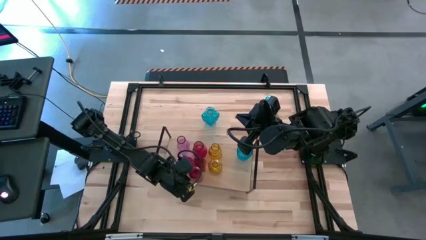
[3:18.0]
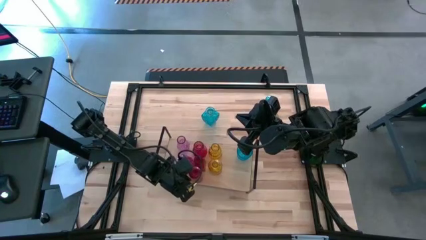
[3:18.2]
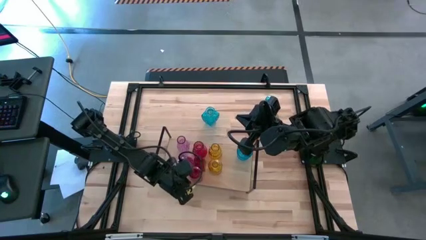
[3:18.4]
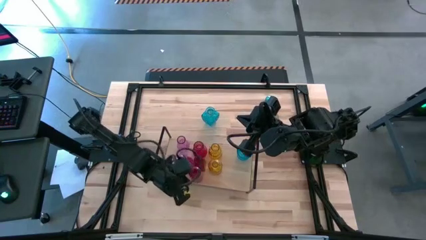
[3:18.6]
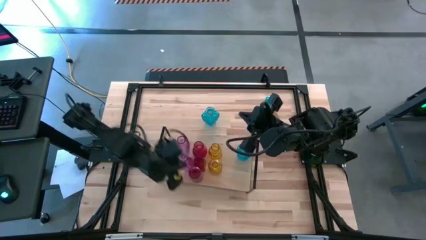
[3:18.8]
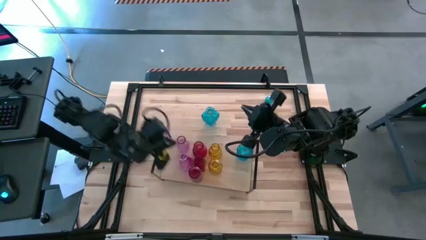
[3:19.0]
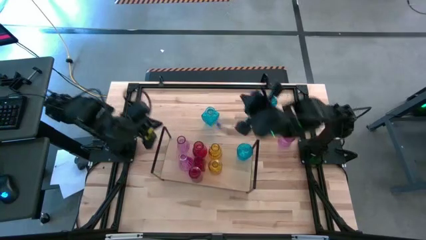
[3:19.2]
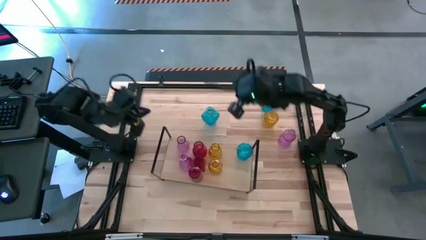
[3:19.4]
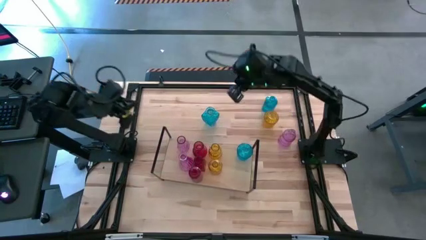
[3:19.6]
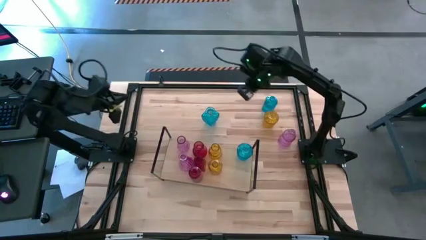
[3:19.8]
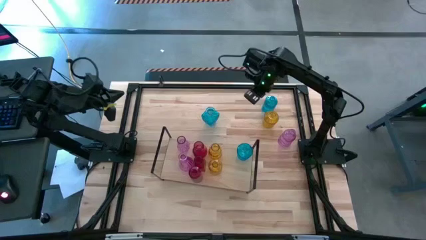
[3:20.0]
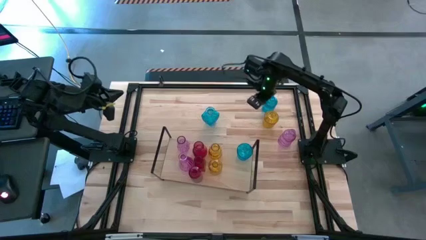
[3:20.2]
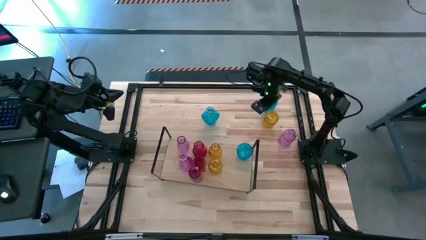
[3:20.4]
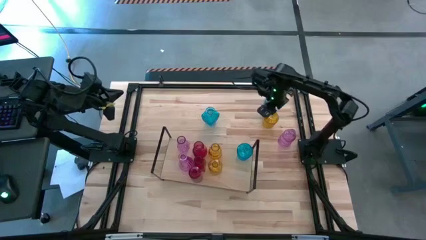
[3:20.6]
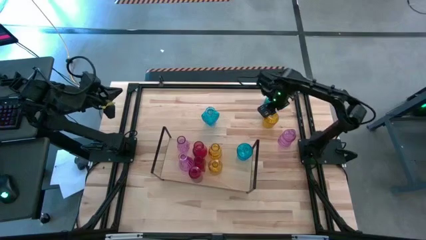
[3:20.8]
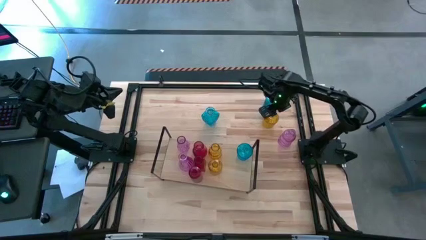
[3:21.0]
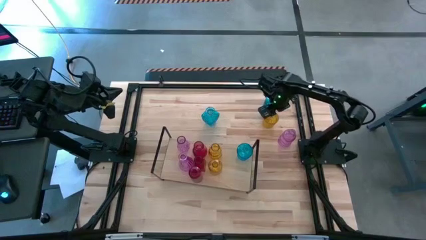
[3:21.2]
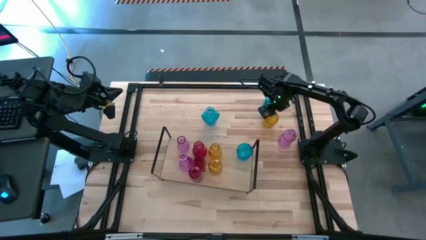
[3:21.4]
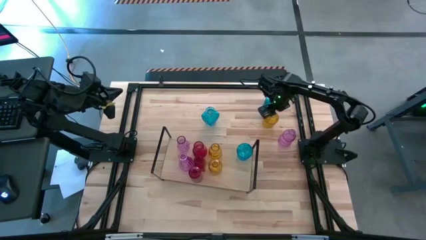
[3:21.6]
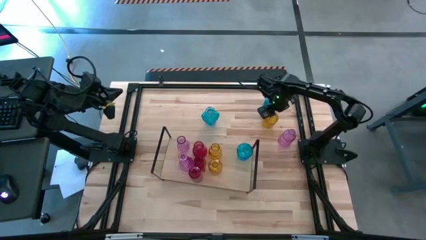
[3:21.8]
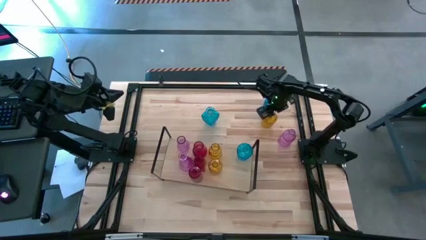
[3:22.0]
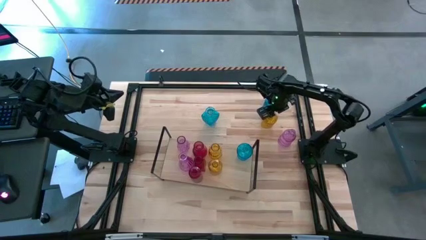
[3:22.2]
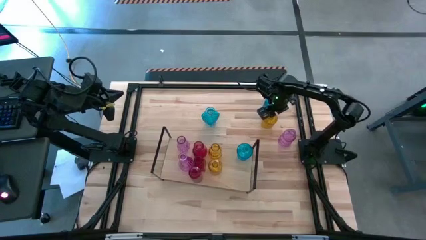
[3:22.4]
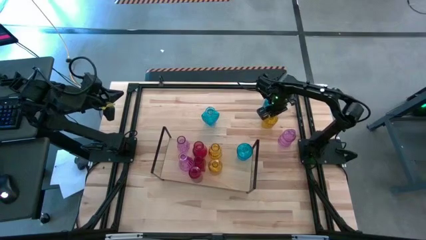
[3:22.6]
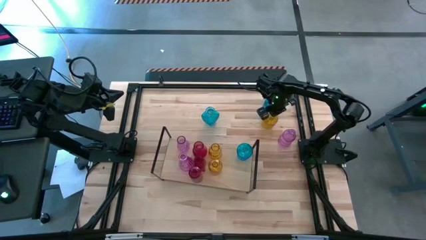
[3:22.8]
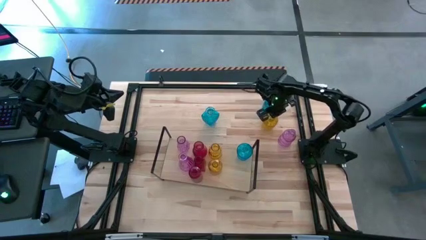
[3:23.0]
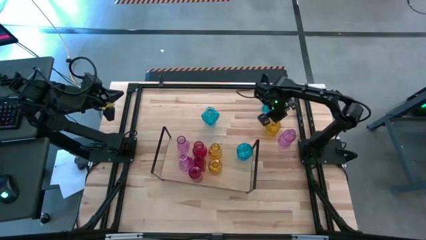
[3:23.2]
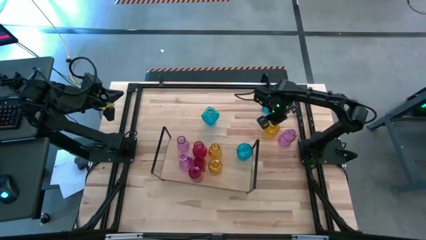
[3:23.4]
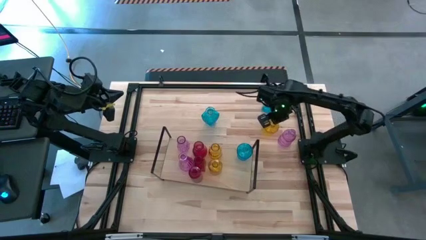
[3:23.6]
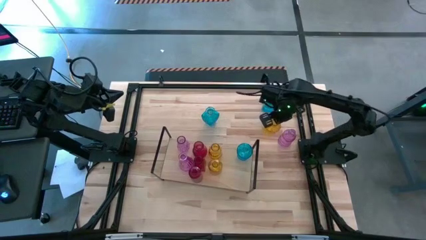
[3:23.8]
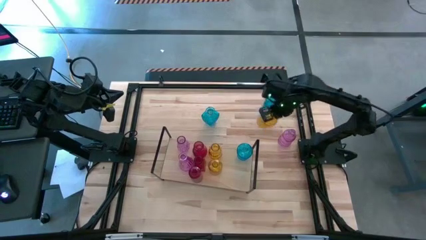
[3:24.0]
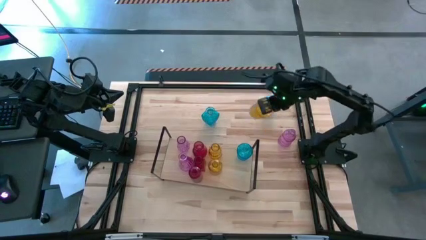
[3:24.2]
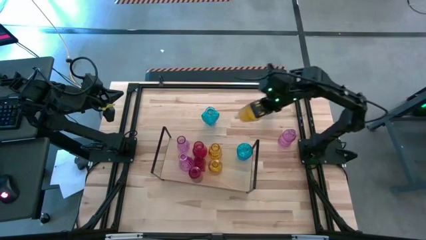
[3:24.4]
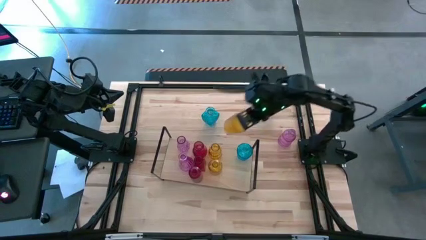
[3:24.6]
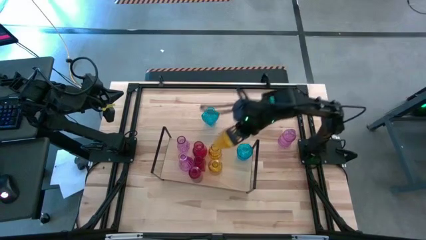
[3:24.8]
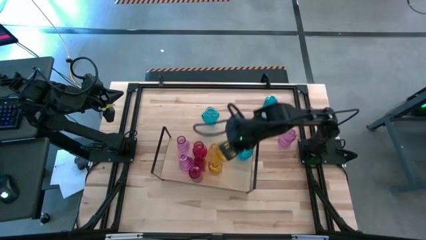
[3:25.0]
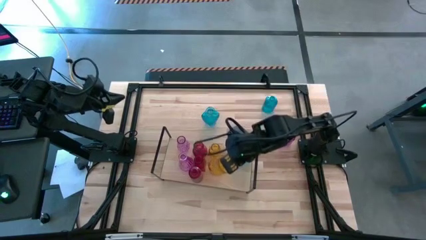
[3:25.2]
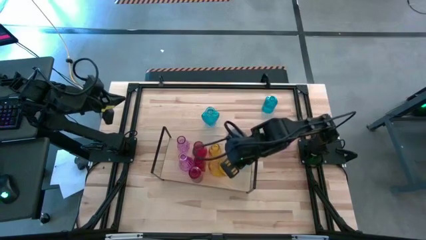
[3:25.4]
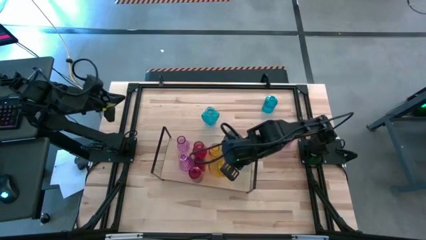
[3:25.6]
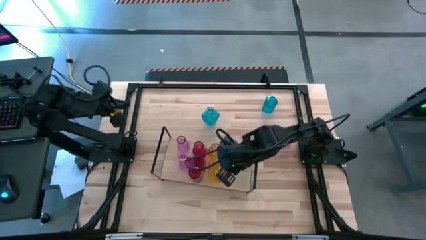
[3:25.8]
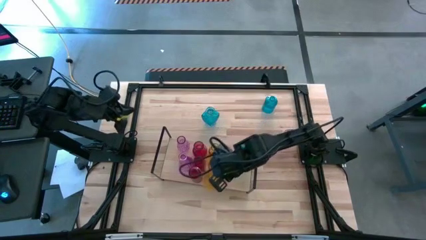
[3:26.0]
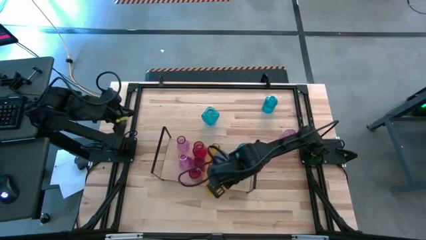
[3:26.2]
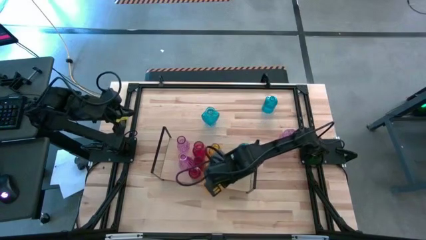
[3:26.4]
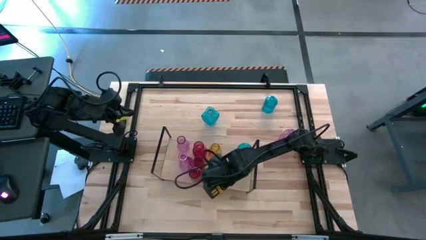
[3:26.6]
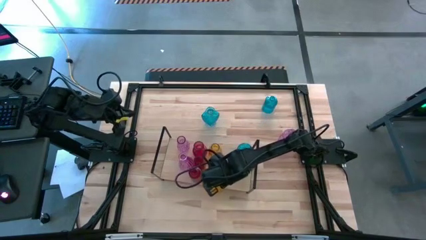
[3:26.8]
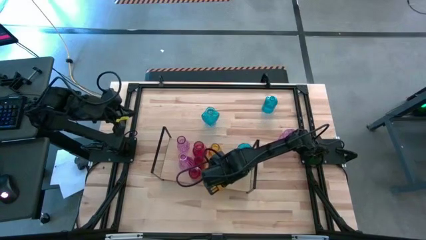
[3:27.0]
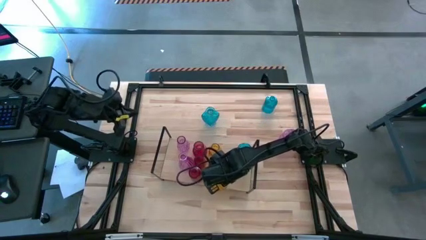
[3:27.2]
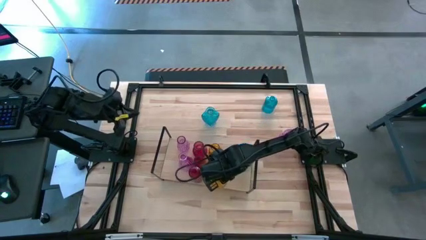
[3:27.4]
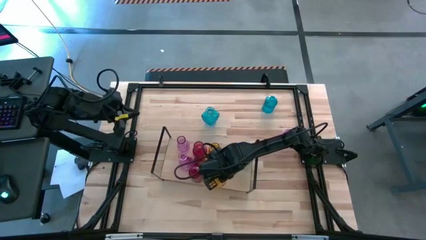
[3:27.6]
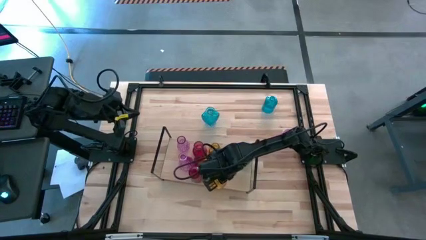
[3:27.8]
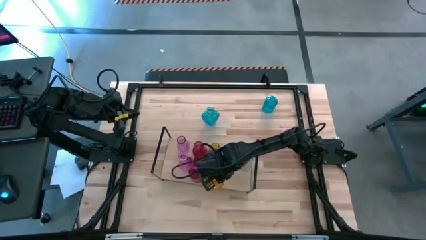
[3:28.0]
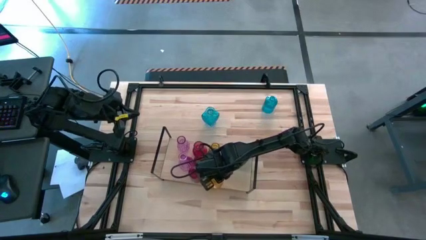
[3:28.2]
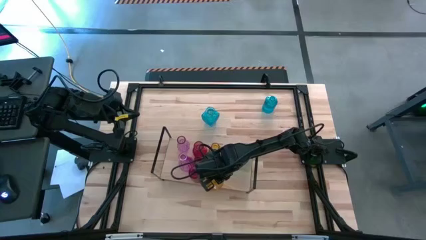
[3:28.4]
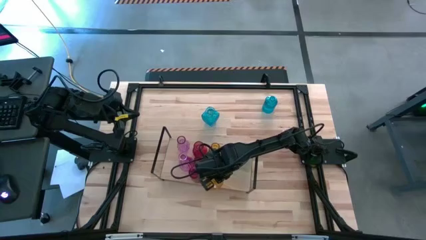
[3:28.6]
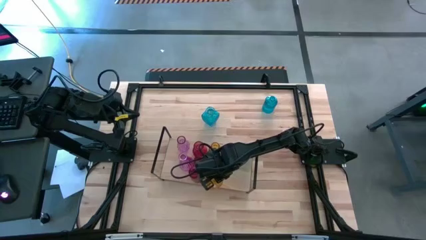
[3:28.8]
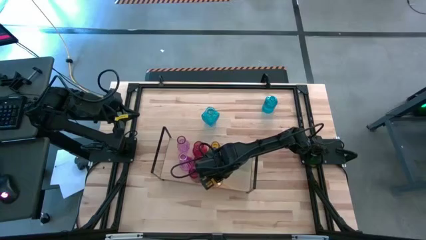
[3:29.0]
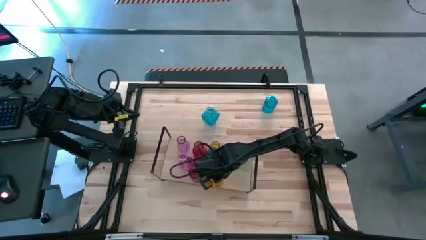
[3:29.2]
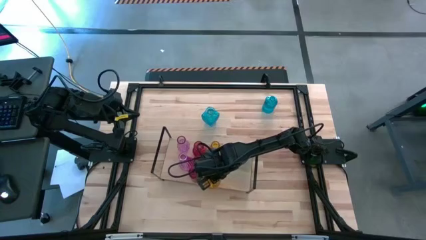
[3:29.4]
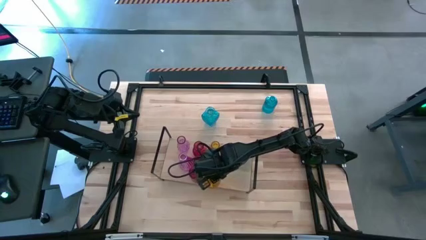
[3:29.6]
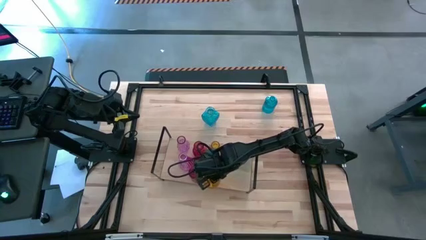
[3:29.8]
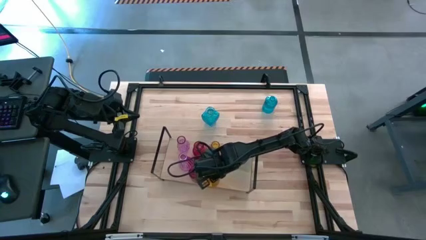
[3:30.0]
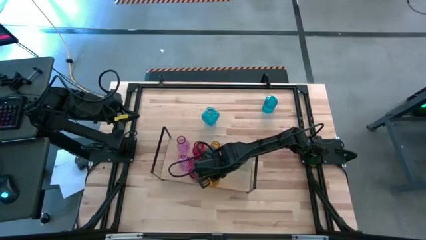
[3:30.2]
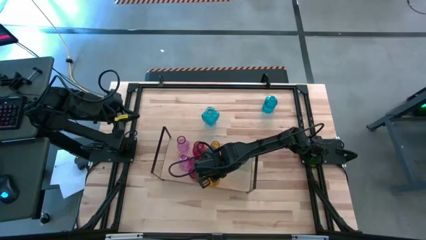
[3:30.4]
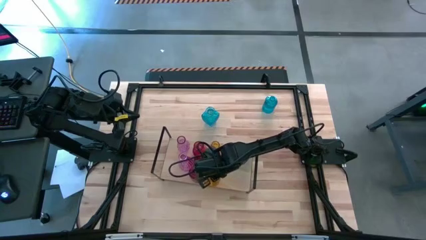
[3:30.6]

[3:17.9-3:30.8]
Task: sort vases onto shelf
Put the yellow vase on the shelf aligned with the other yellow vases

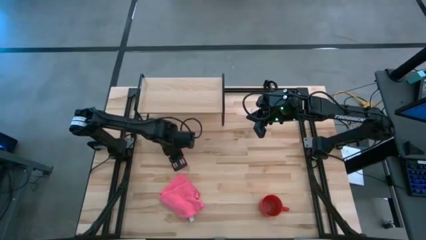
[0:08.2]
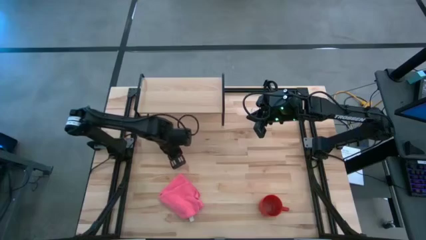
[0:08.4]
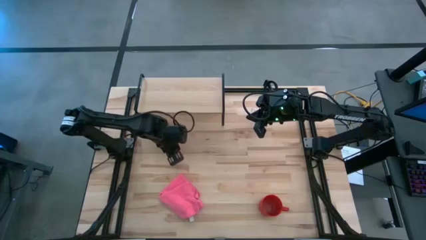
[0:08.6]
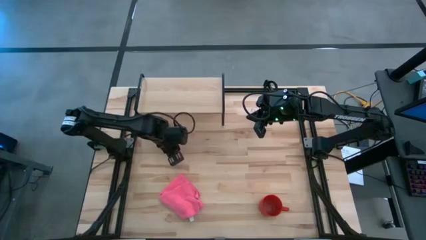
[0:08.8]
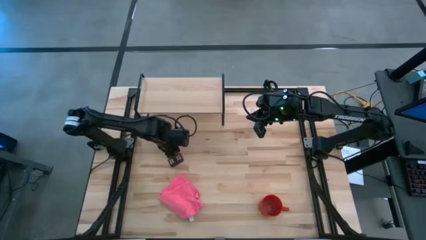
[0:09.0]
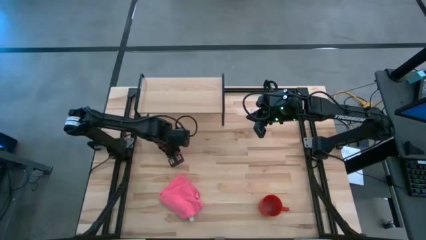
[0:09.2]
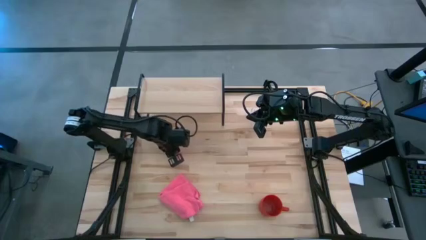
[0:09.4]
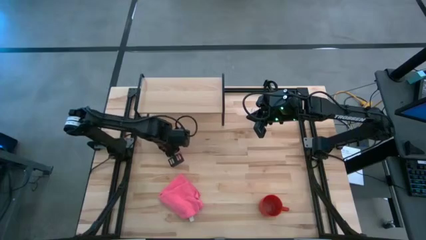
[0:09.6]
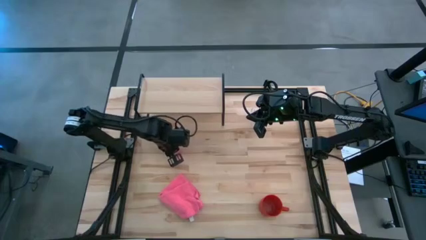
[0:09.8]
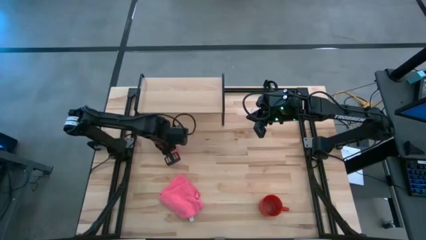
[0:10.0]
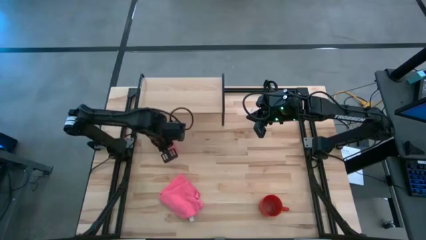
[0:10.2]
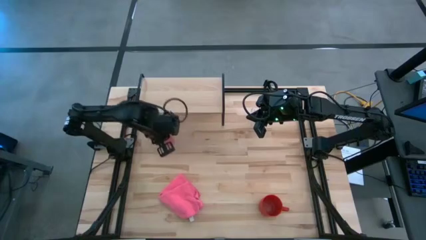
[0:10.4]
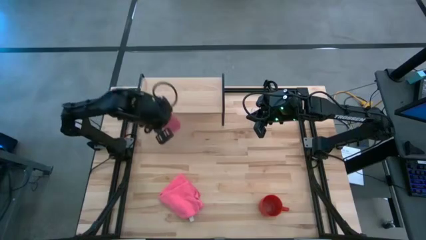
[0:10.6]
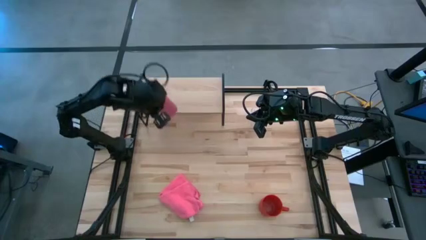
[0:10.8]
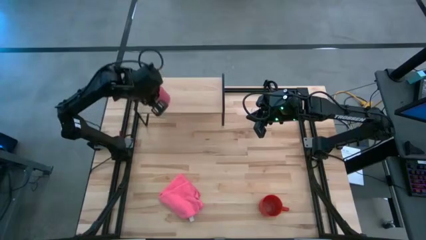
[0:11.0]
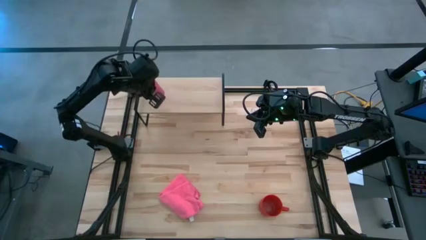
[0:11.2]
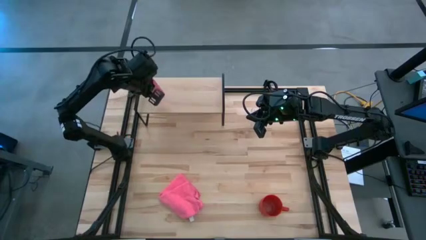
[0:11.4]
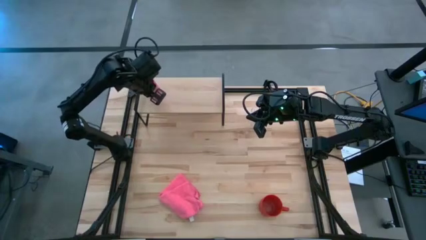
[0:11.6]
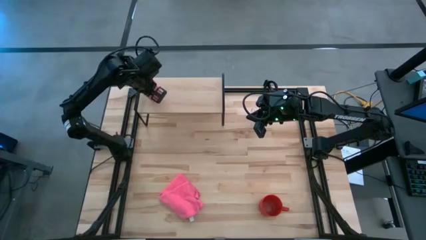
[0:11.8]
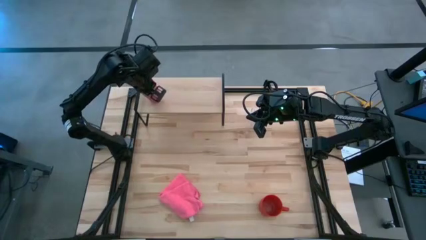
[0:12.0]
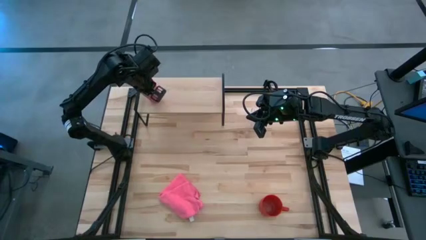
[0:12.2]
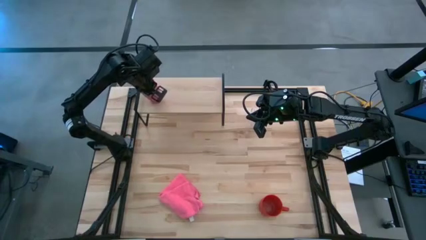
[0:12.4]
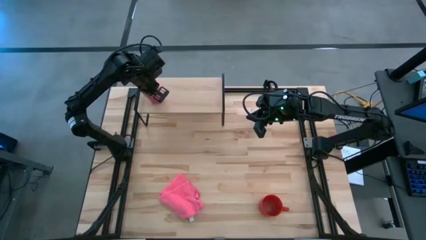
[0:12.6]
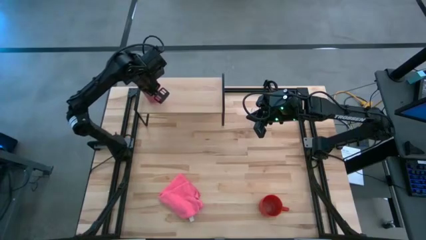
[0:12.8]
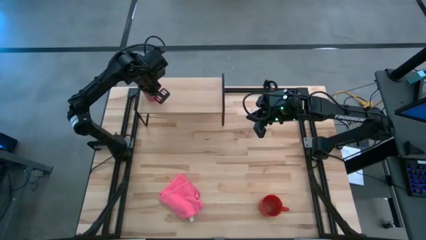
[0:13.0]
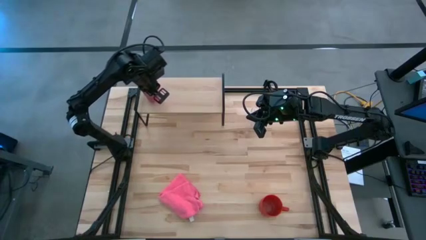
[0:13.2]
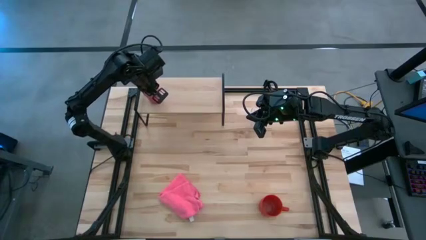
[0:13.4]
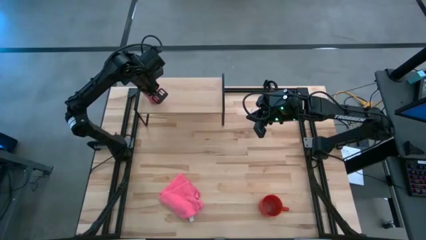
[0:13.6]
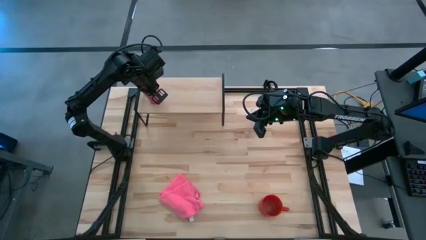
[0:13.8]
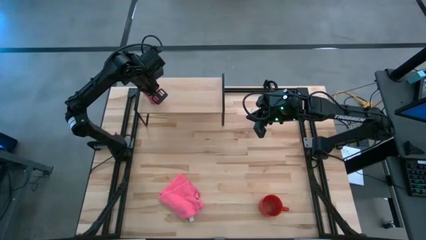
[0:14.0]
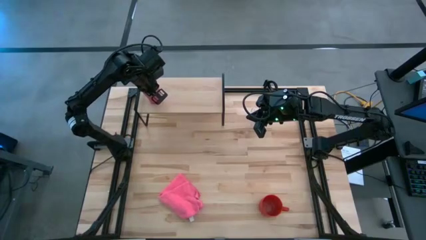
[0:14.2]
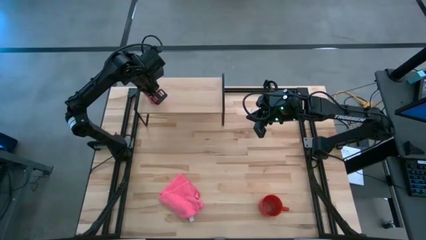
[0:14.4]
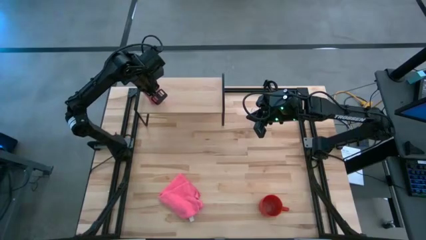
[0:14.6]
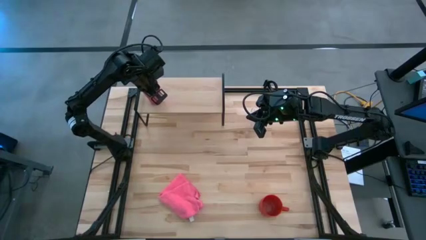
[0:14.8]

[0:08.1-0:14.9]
Task: Stack small to large cups/mugs on shelf
Put the pink cup on the shelf
